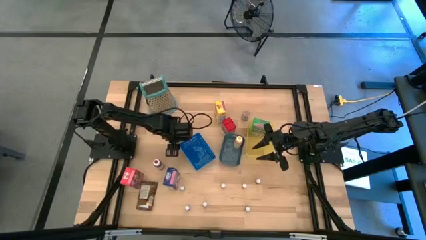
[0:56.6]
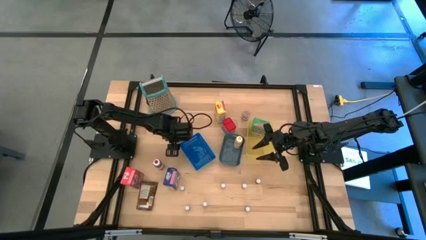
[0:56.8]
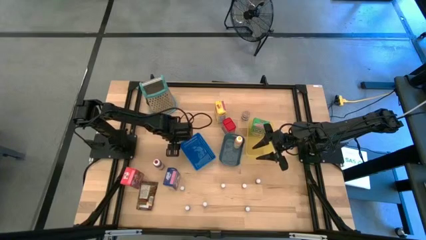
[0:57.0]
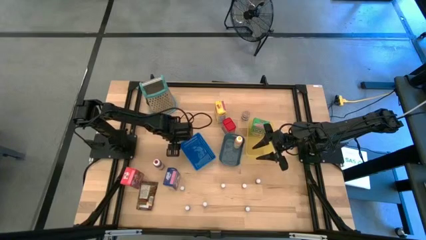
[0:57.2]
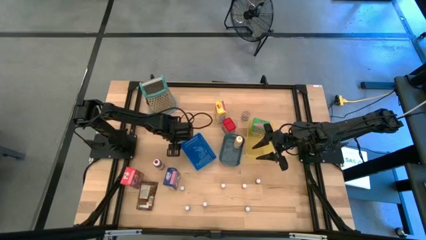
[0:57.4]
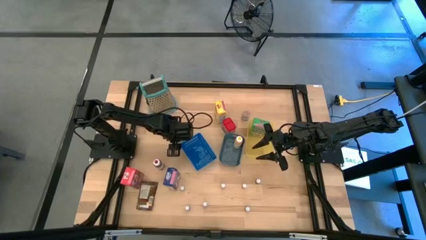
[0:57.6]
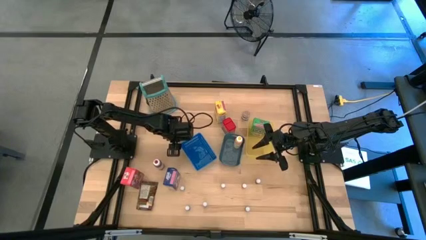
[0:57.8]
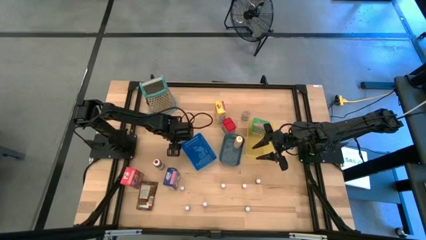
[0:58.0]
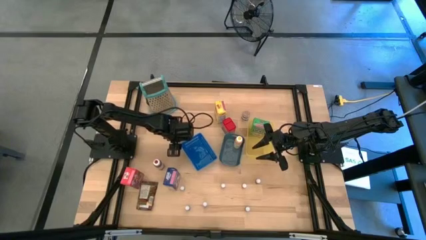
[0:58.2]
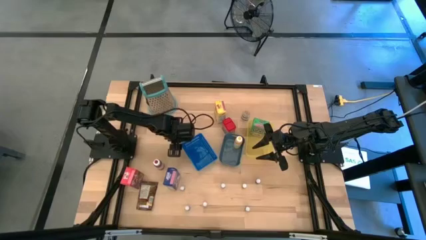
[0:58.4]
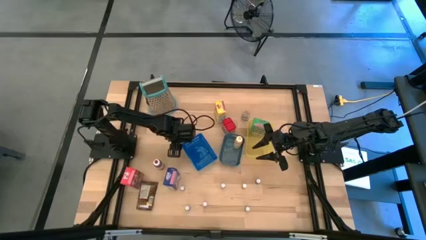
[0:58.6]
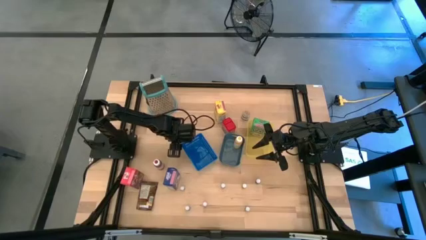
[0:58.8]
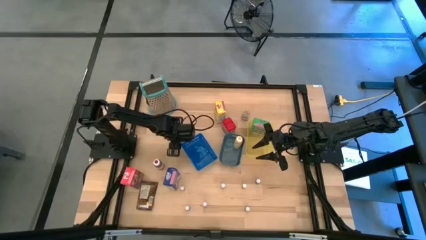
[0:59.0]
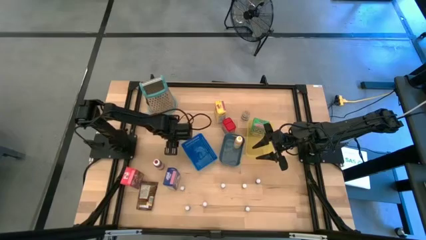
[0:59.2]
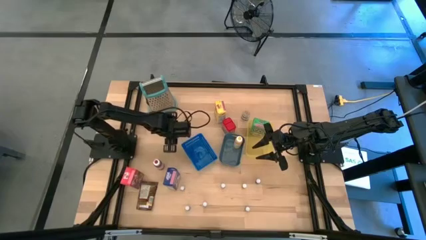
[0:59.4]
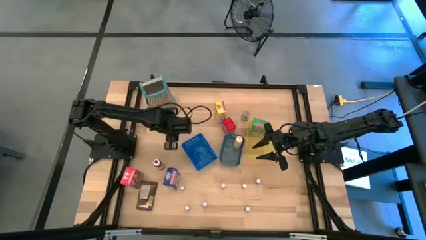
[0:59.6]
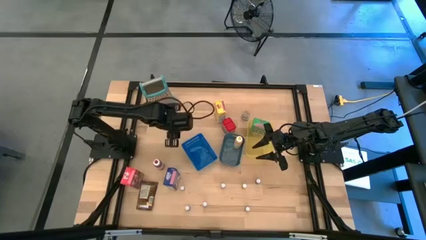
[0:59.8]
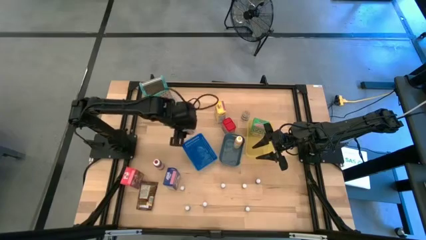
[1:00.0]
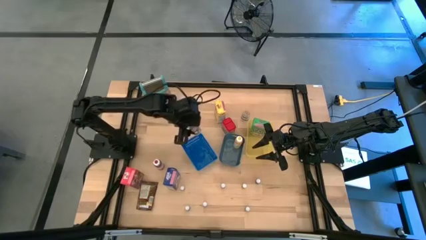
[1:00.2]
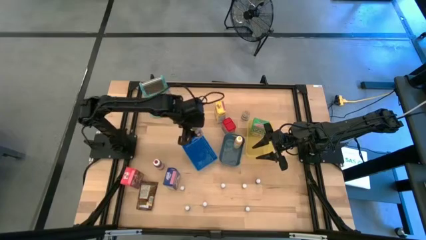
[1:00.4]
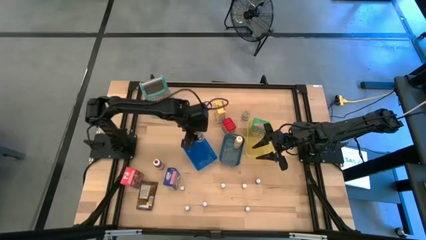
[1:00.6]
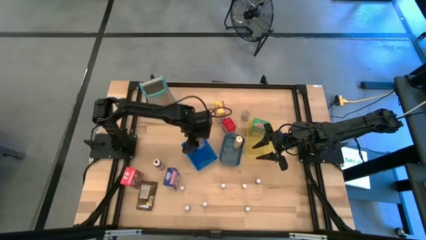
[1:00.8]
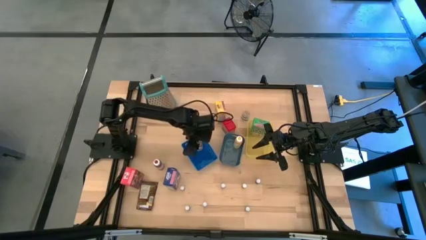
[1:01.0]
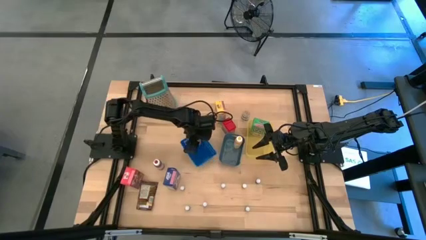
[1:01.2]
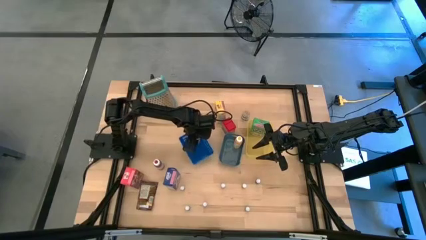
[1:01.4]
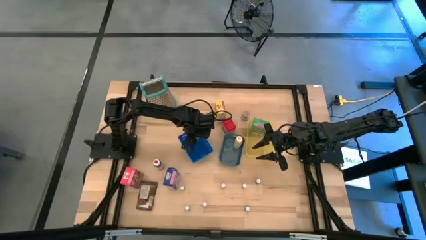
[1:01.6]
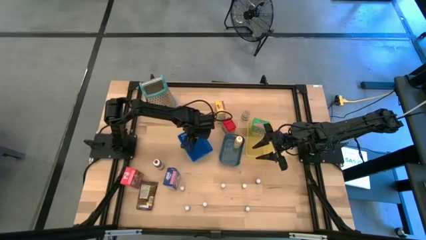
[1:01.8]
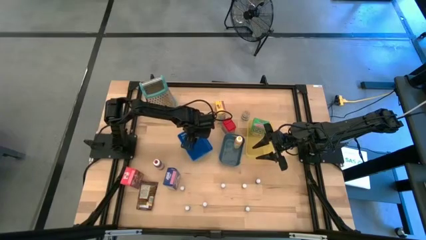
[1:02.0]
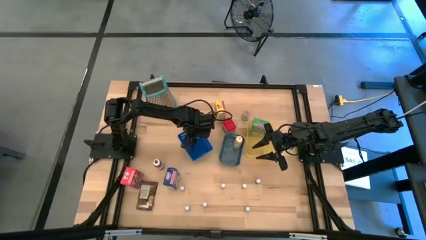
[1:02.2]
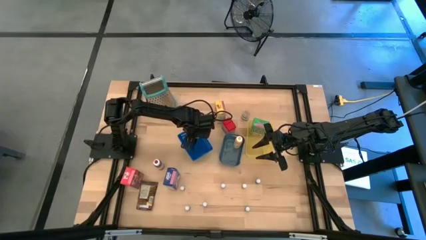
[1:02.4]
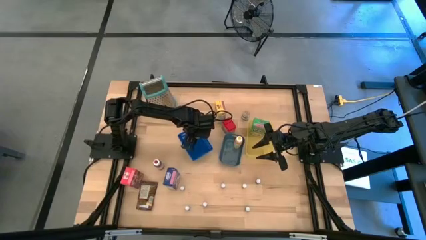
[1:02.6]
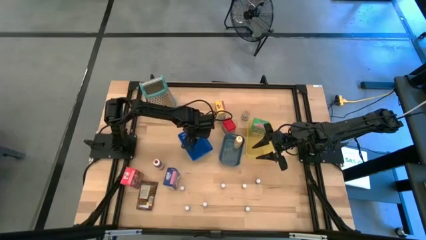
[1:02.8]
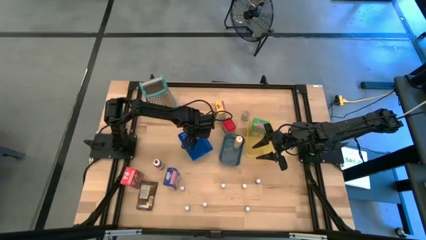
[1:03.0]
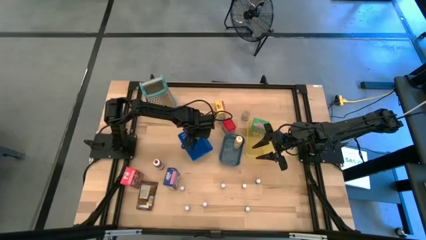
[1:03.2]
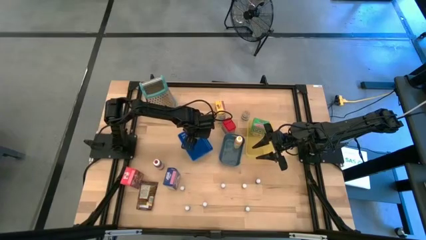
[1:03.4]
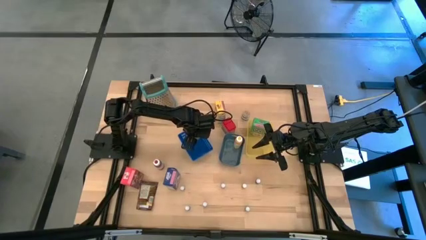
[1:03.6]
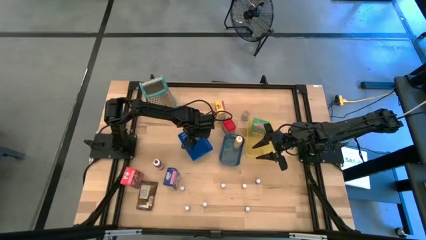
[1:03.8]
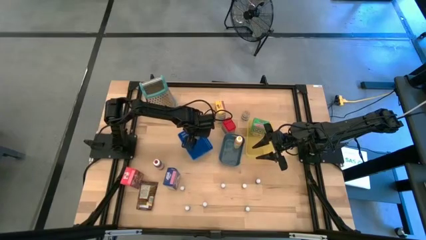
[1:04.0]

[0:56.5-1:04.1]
Task: Pick & Place Kitchen Items
Put the brown seasoning bottle into the blue bin

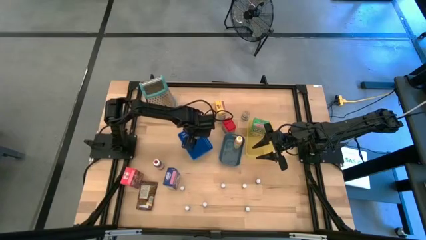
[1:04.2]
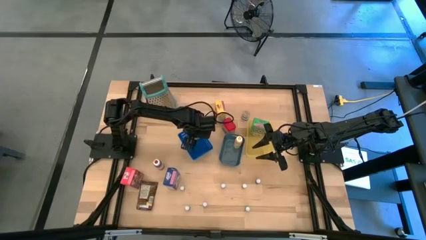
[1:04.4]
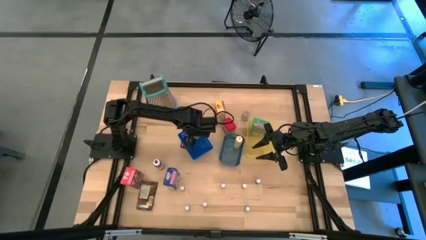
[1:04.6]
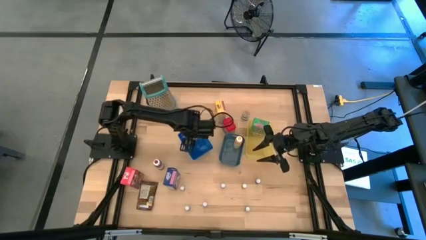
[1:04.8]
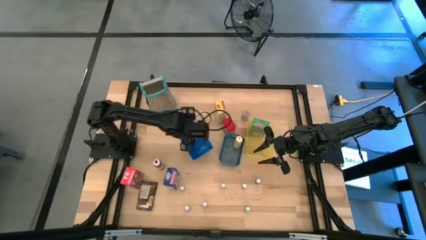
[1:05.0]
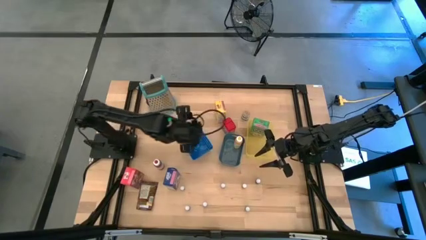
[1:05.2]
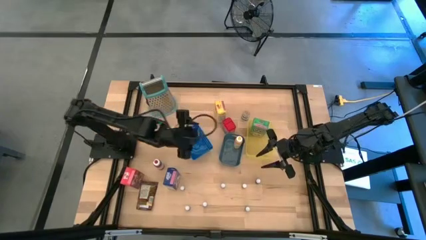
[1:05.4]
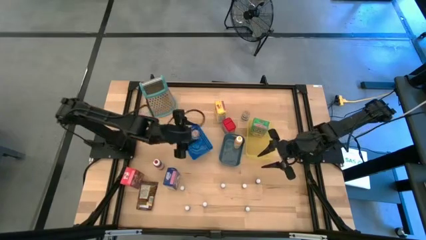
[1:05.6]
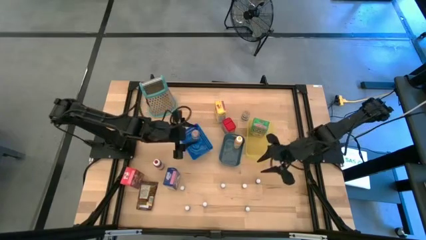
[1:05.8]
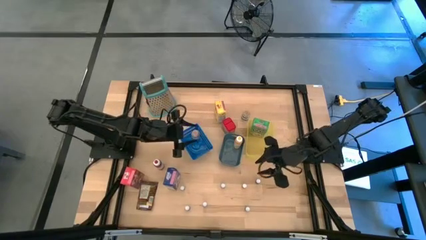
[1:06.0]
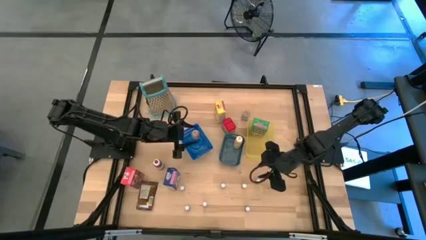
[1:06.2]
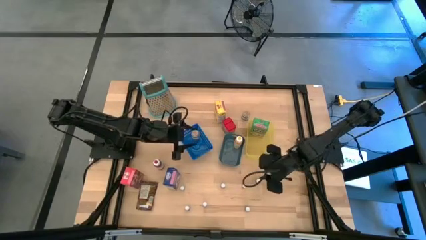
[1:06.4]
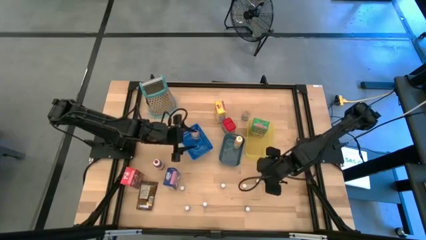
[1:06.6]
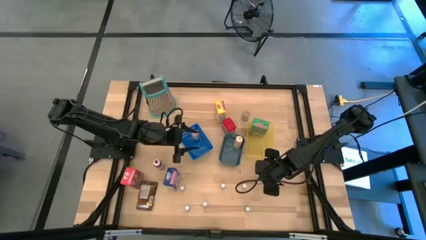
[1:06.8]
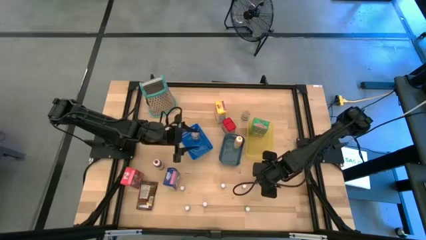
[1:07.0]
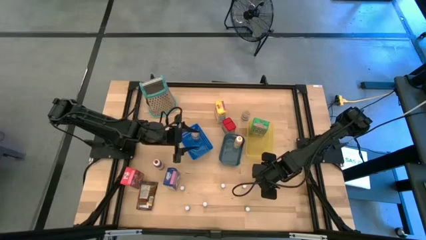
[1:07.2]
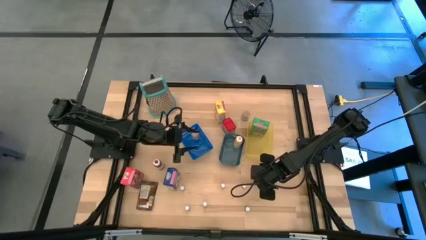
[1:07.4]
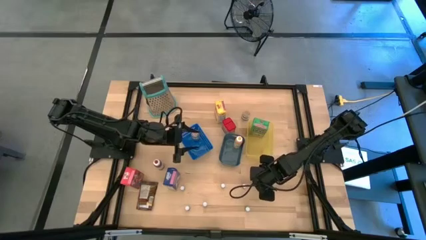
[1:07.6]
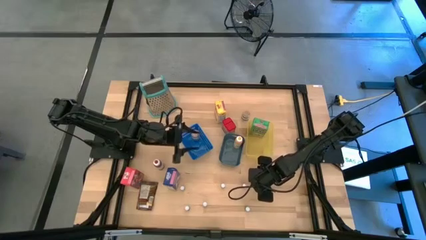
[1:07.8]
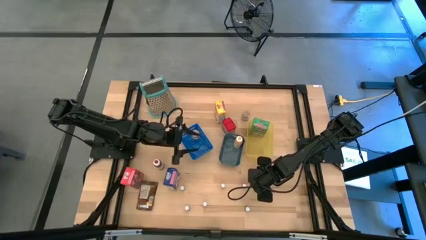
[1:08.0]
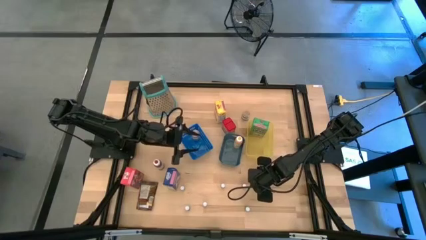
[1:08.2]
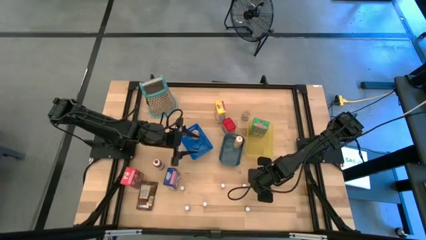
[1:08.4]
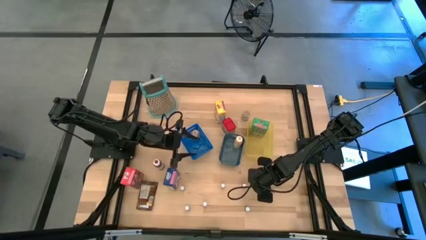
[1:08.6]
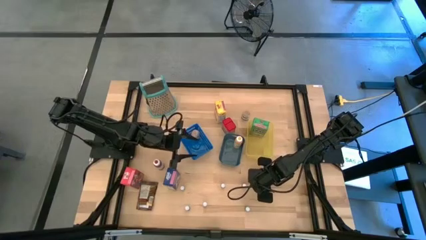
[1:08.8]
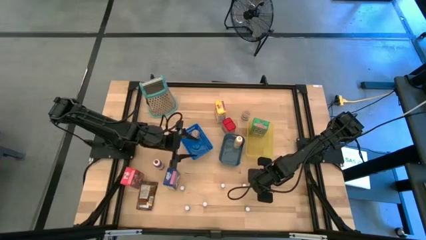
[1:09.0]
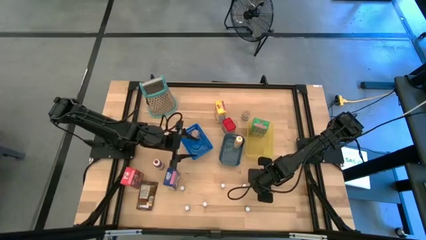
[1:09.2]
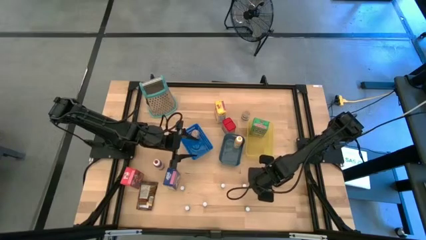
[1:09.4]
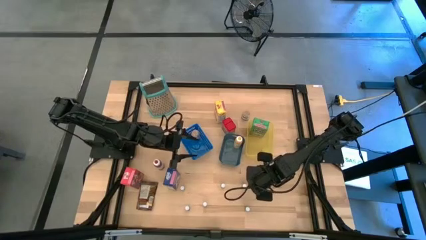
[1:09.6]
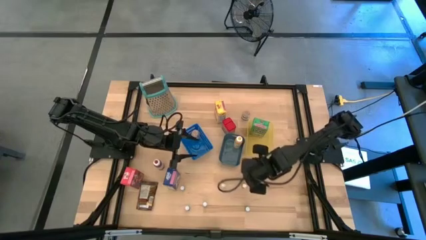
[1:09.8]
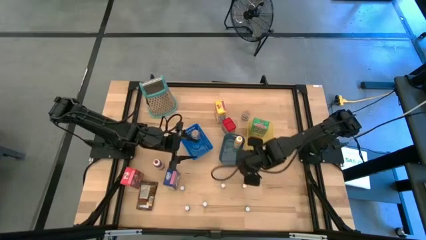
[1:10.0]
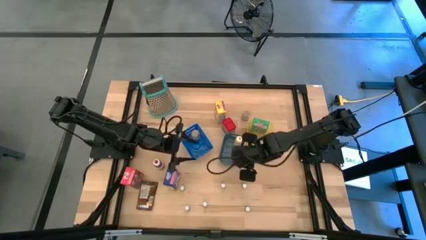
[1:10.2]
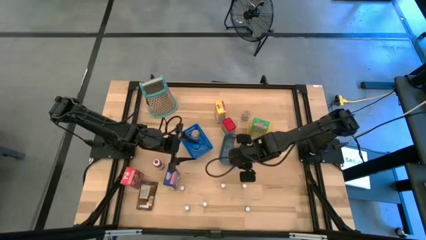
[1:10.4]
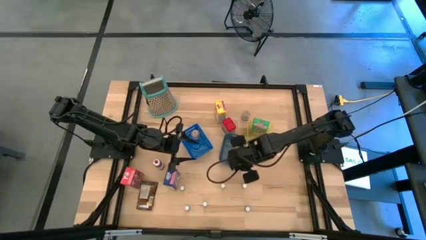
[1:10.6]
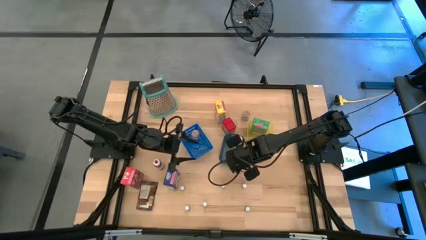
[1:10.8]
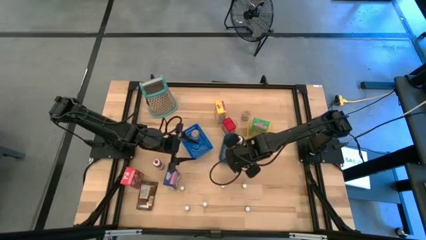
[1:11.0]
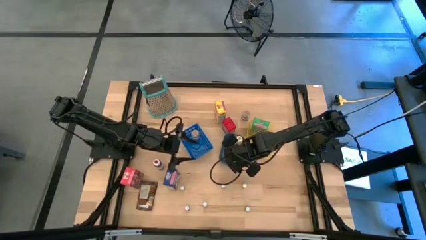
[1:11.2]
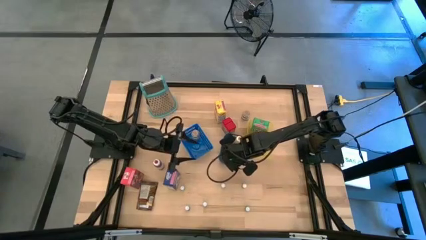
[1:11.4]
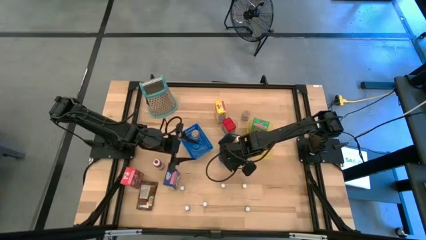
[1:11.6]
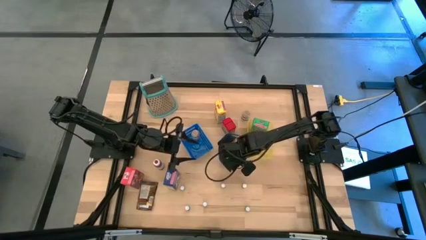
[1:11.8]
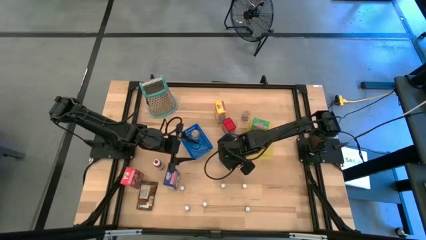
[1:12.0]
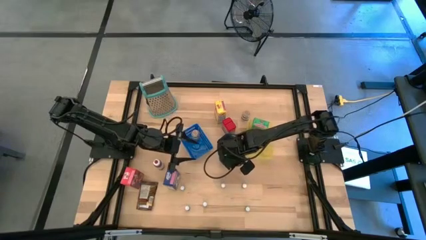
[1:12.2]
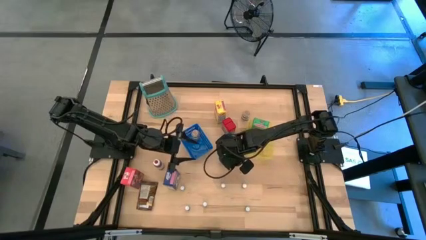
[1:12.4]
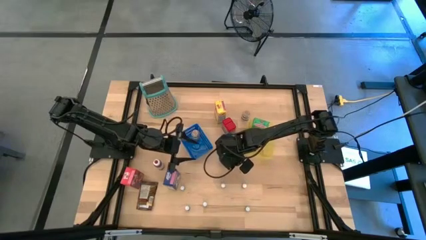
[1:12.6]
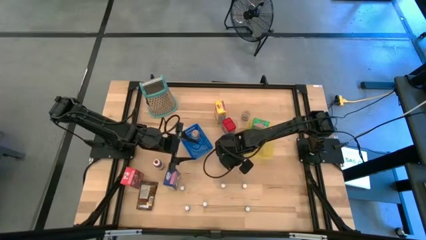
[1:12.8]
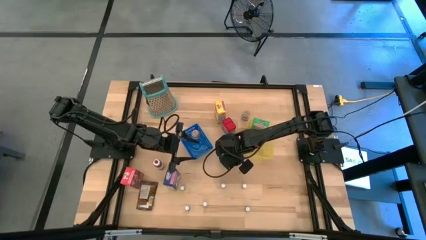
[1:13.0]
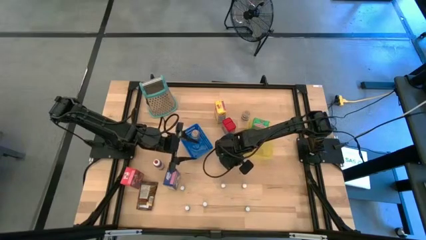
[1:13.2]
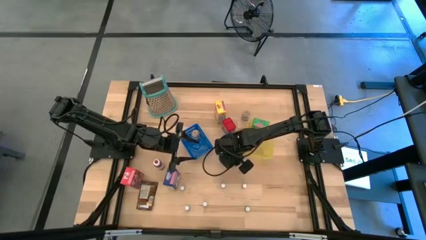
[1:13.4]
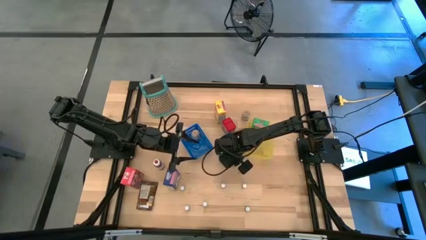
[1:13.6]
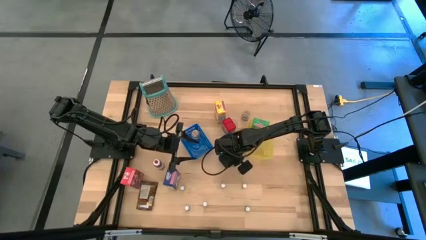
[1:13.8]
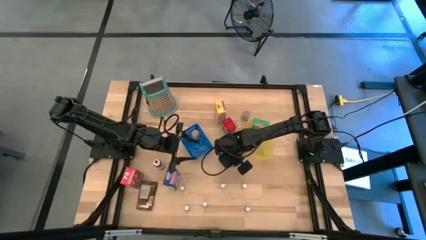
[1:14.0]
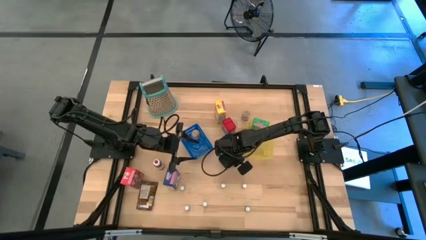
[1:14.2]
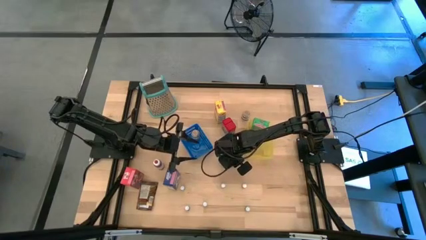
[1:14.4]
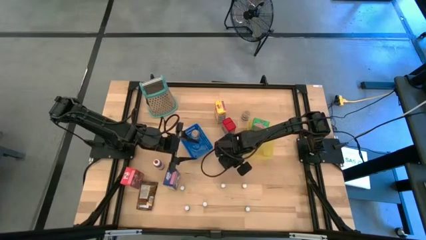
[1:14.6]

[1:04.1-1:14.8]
Put the dark blue food coloring bottle into the green bin
